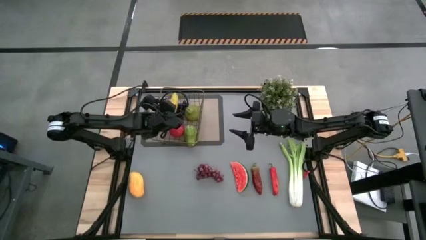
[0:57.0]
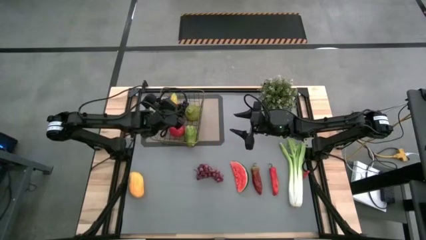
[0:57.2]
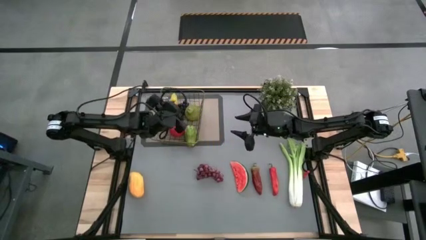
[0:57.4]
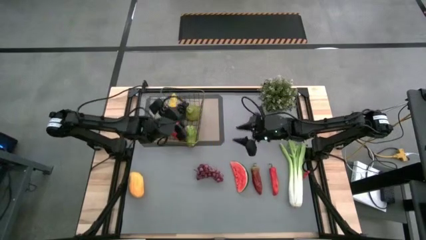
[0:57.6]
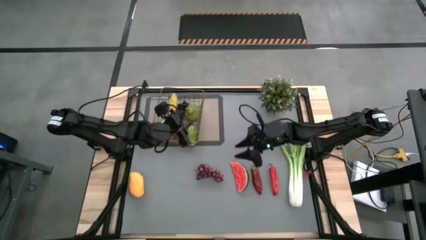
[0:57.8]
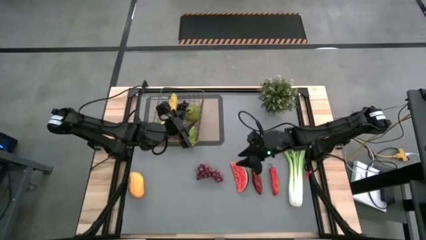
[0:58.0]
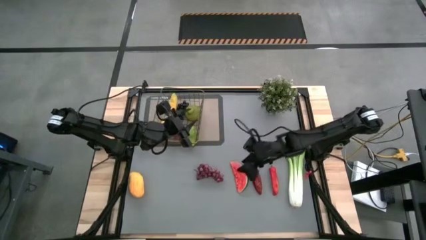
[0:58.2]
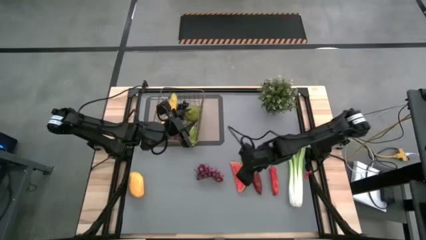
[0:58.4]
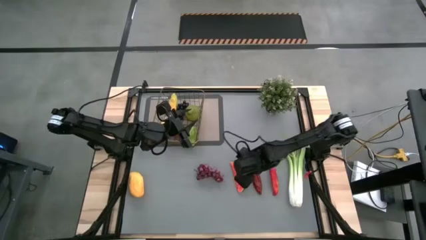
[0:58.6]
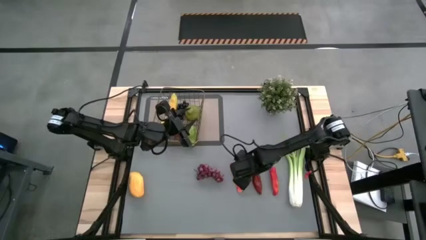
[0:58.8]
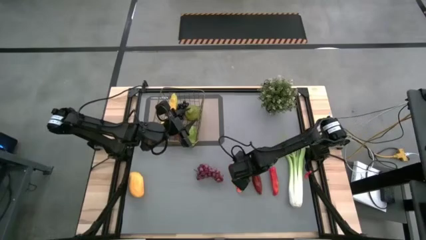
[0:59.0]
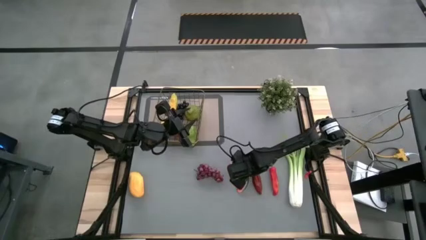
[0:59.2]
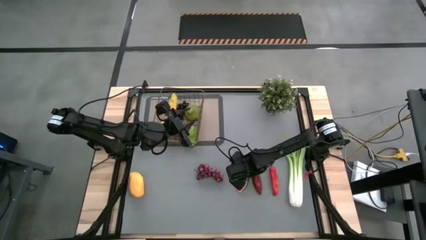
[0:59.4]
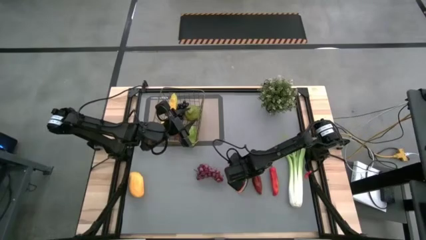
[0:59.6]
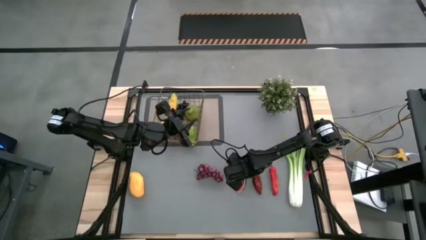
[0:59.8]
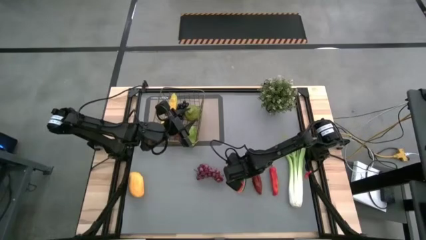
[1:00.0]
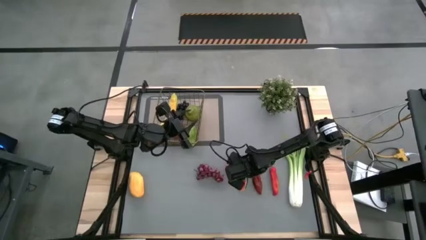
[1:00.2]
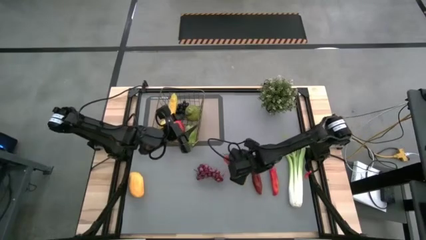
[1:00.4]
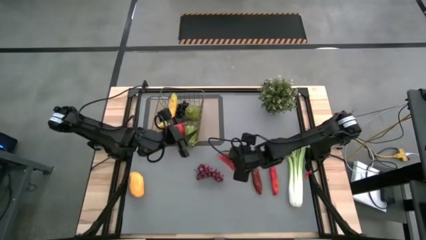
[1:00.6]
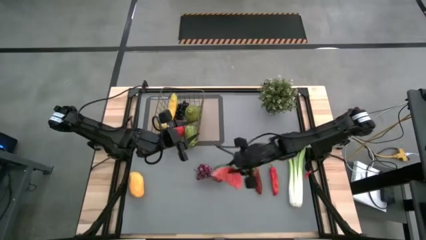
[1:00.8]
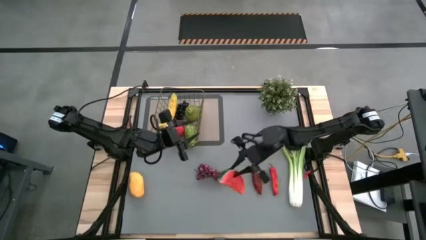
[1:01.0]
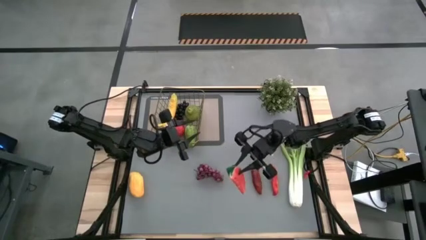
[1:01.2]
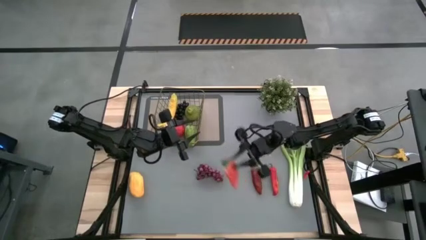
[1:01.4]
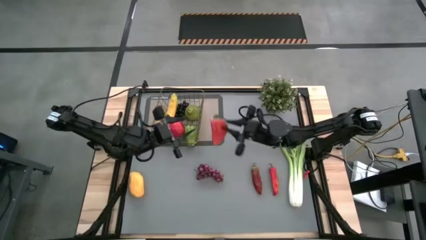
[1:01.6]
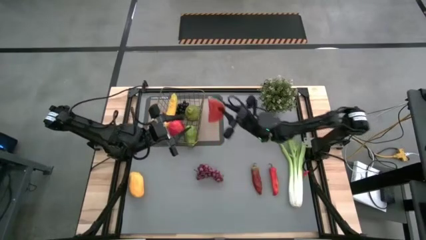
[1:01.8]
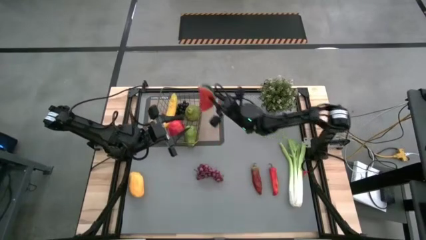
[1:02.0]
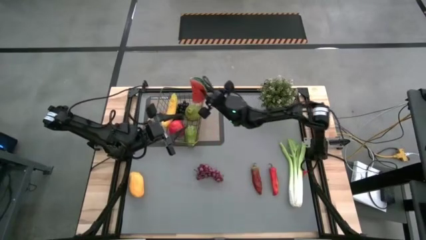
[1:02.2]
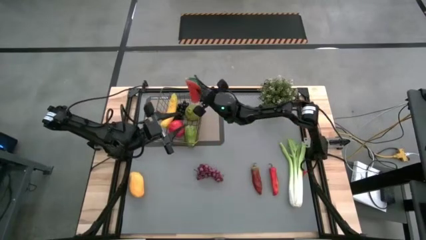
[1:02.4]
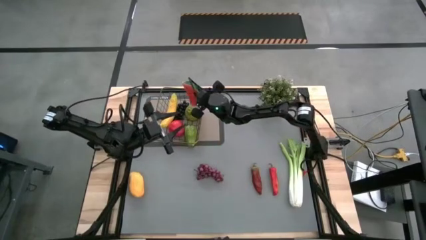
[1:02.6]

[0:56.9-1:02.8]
Task: Build produce basket
Put the watermelon into the wire basket

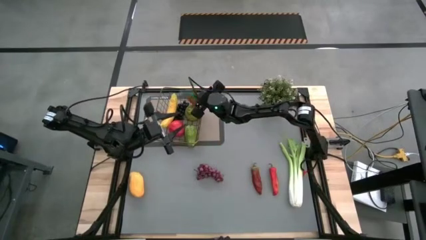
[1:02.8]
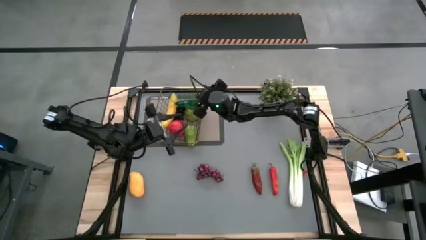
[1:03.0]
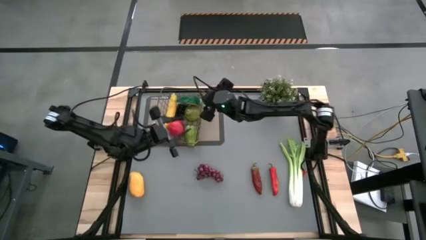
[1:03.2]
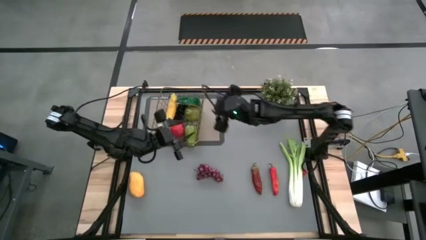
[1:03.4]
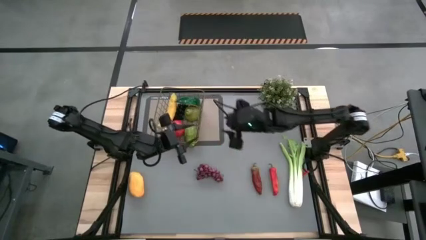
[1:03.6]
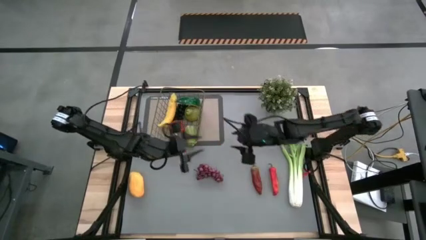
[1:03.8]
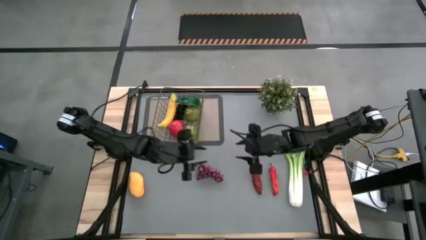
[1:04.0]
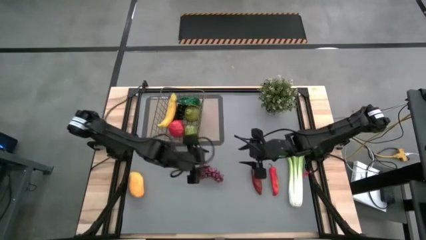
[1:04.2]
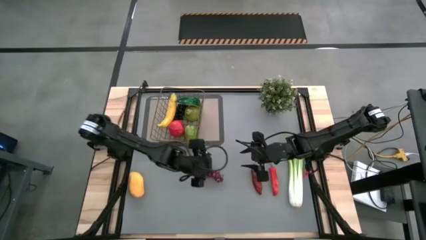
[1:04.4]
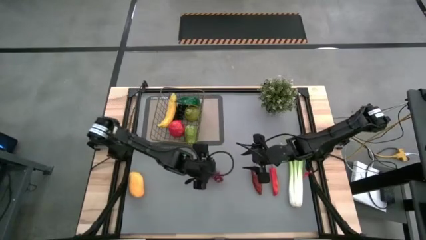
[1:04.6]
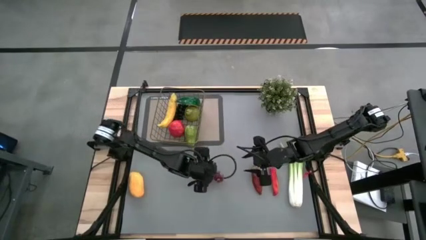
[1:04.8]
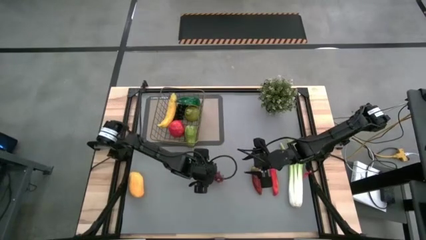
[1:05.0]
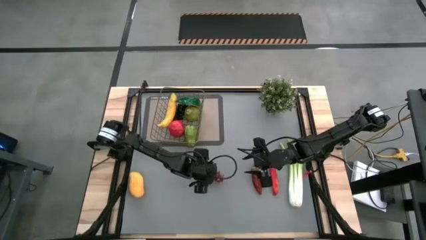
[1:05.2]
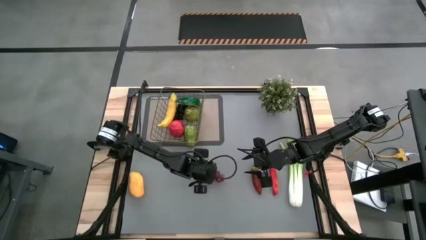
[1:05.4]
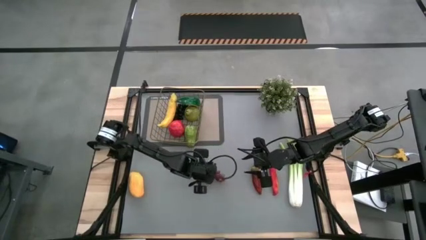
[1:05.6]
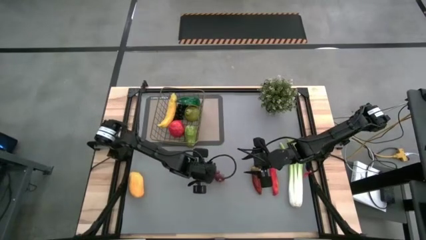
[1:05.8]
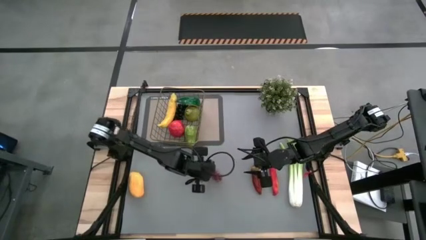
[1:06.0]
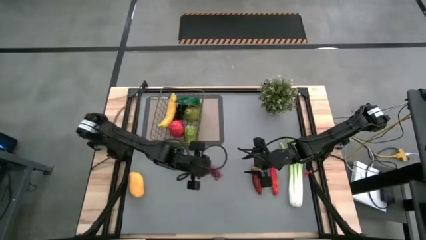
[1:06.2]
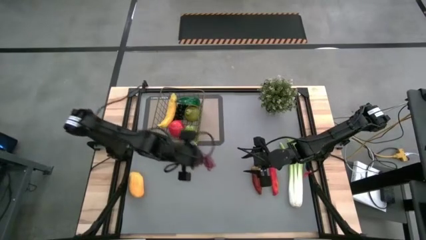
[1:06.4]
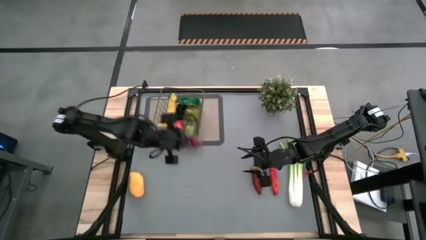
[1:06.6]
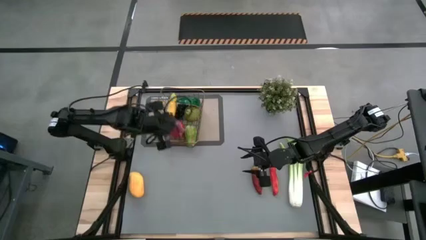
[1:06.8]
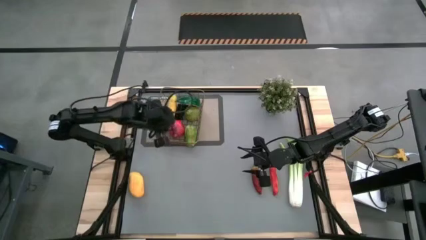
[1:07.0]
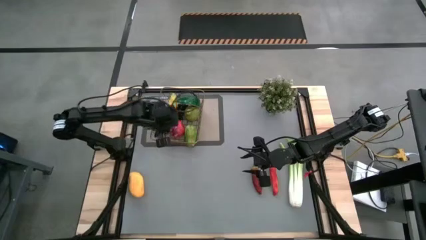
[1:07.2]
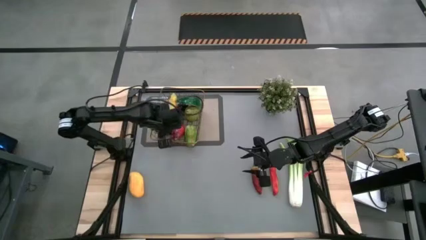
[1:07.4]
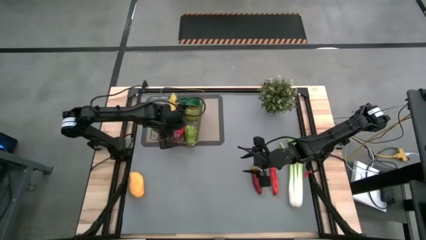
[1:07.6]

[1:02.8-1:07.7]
Put the purple grapes into the wire basket

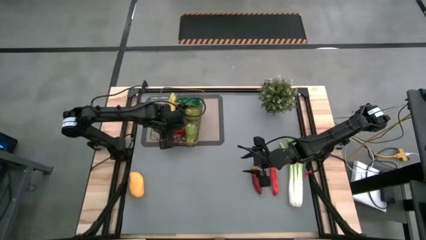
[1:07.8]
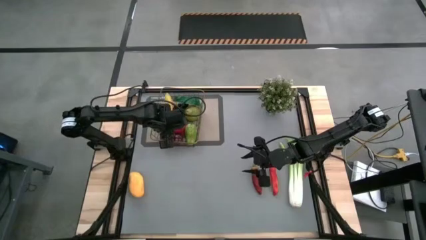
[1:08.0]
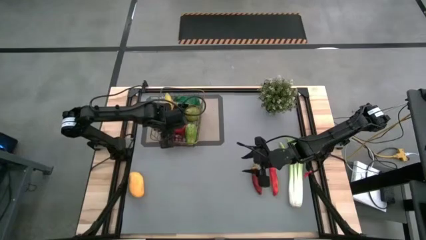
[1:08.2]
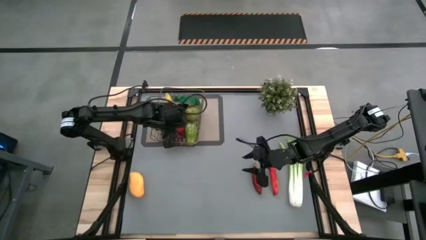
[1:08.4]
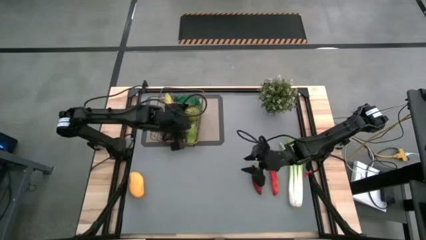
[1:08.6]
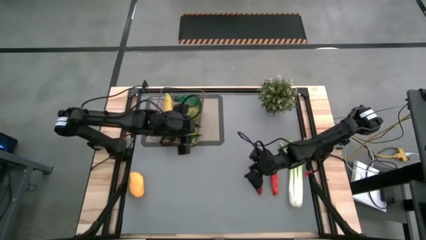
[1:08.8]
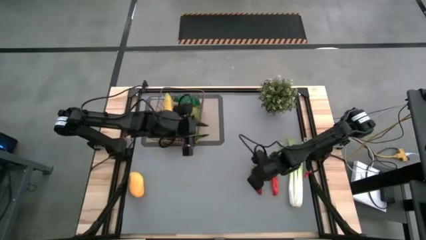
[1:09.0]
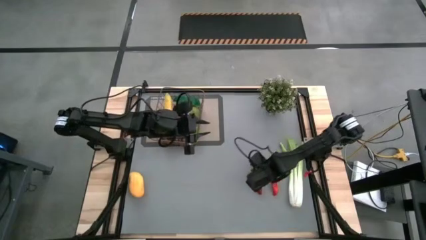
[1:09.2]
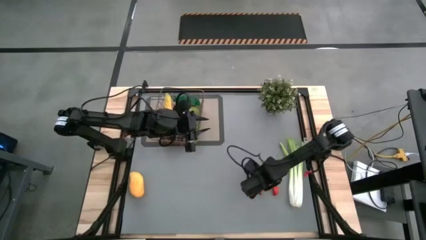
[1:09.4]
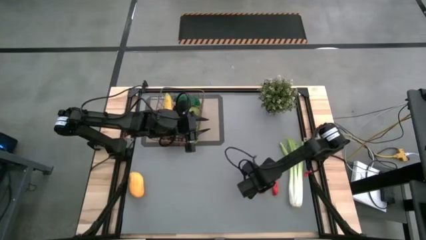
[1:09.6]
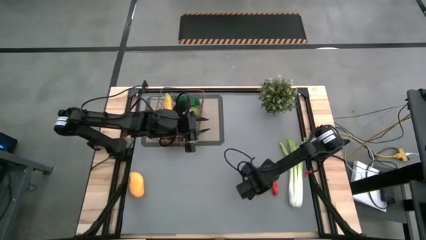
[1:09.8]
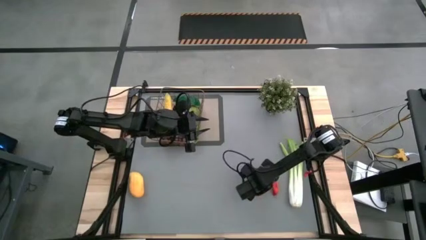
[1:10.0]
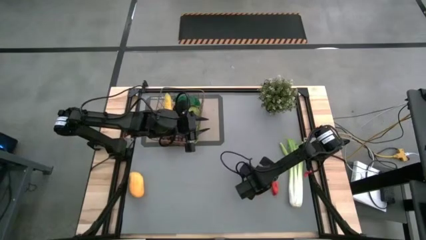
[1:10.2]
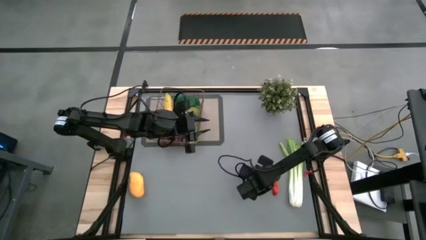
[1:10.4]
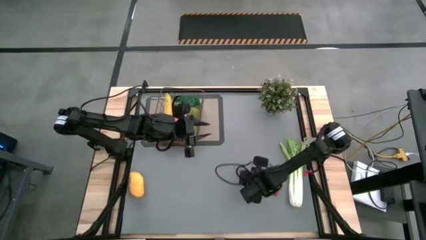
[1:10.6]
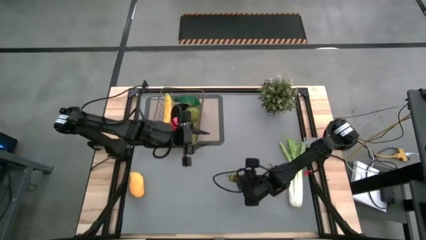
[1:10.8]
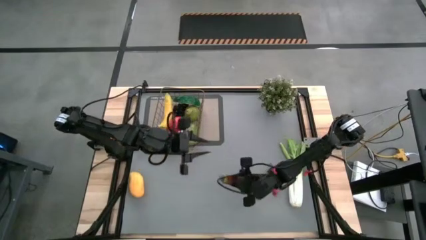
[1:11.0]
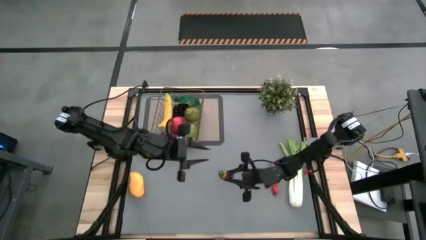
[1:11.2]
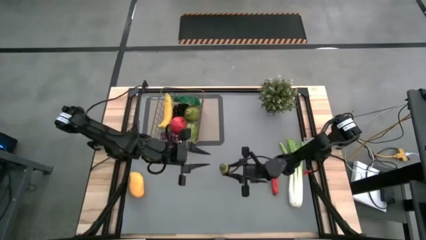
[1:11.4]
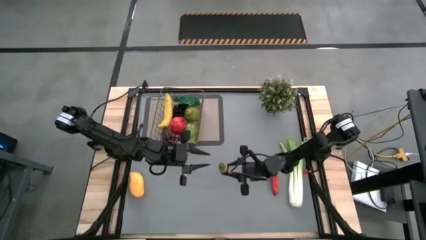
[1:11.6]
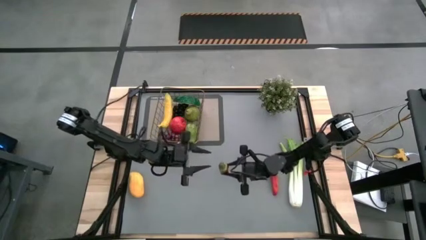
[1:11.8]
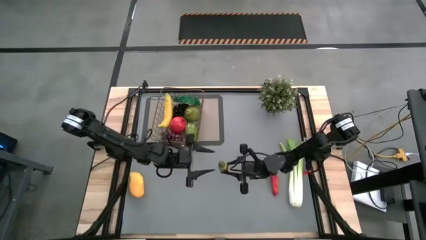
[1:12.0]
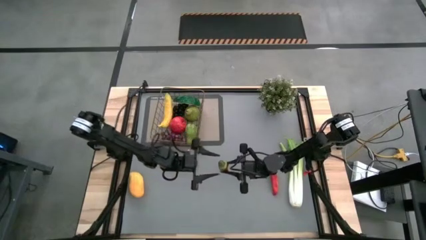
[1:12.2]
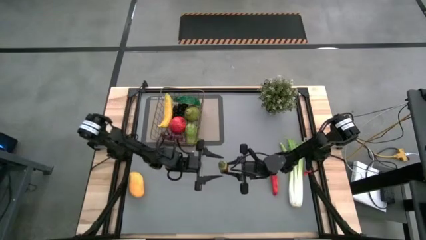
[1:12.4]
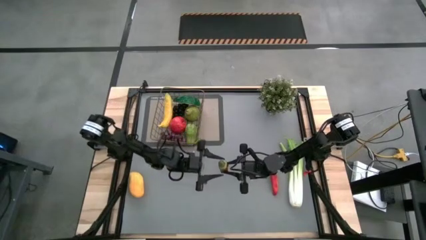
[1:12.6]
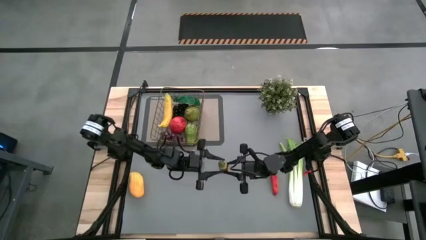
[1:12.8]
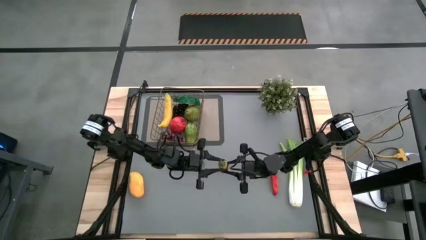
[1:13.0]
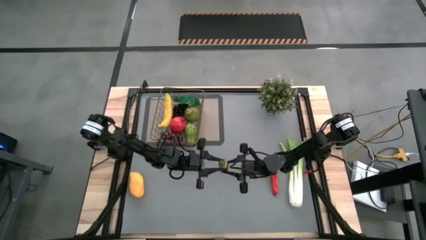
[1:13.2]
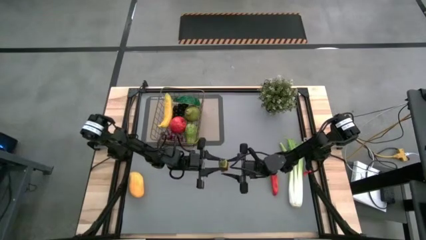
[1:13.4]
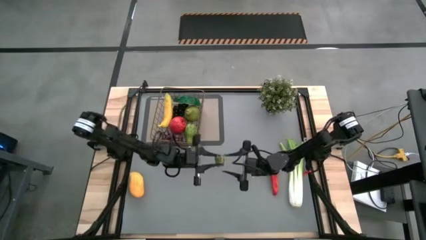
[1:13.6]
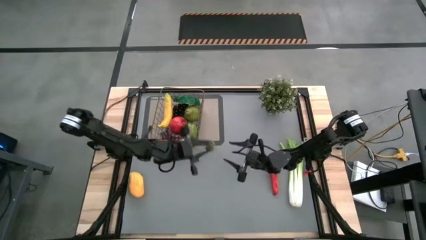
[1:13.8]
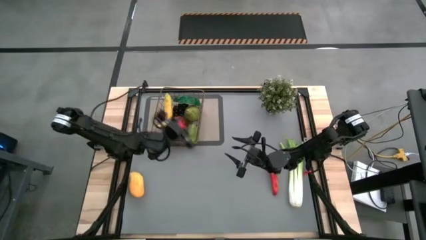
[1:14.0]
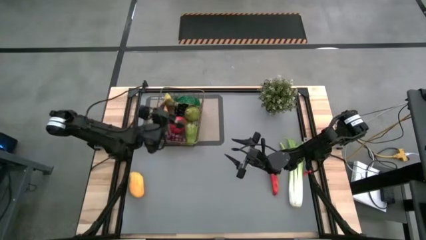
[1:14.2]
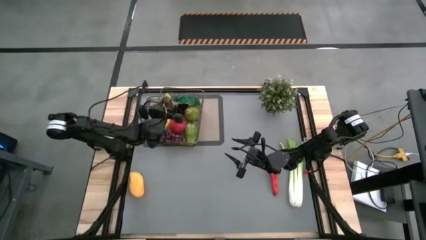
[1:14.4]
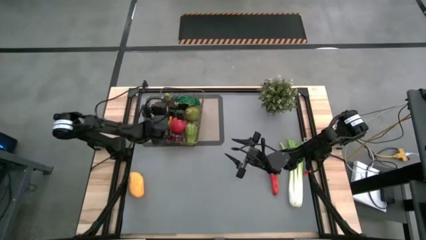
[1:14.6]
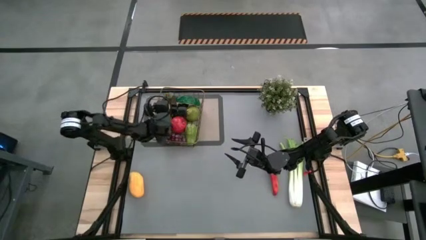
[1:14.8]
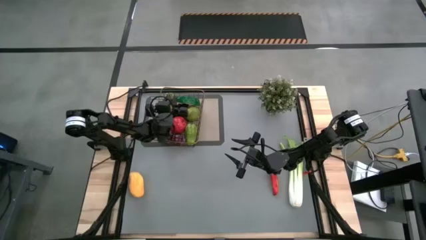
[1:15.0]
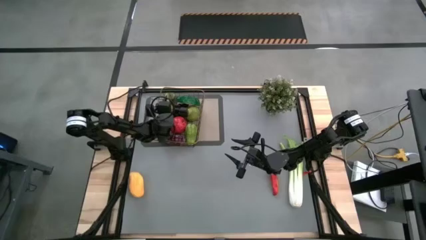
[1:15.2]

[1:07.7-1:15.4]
Put the dark red chili pepper into the wire basket
